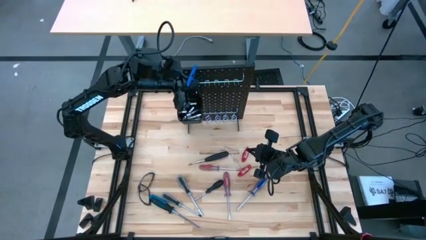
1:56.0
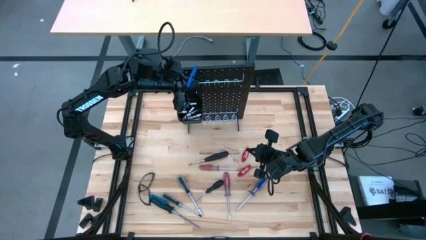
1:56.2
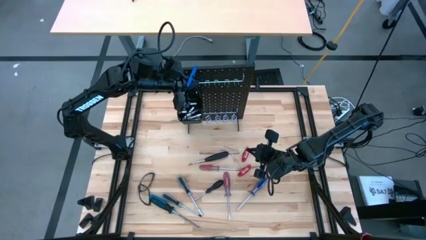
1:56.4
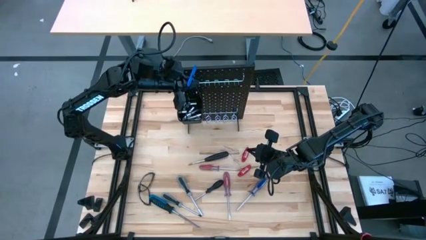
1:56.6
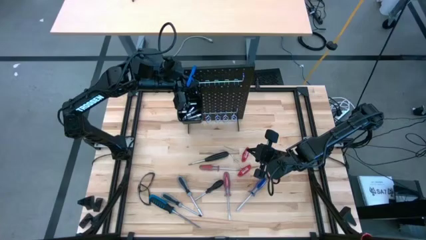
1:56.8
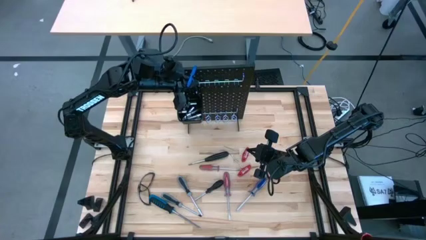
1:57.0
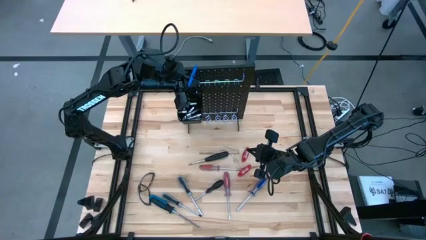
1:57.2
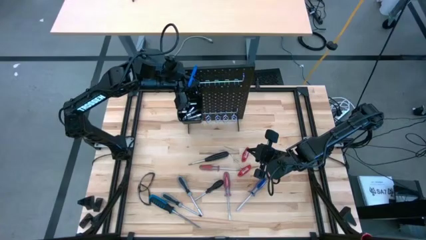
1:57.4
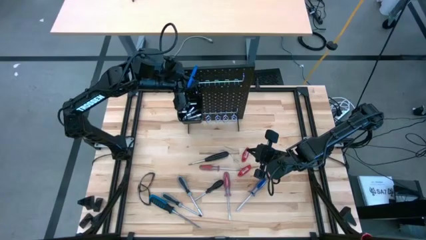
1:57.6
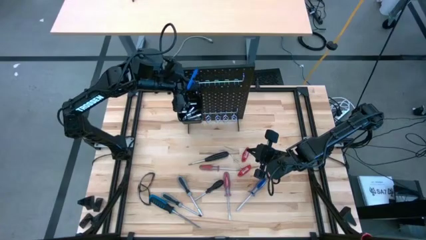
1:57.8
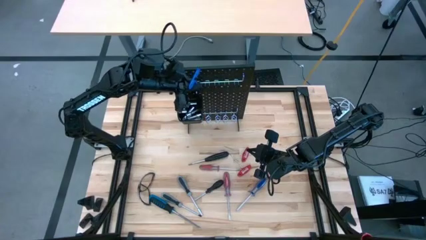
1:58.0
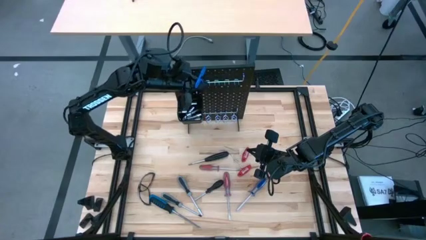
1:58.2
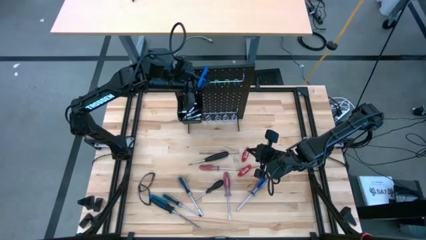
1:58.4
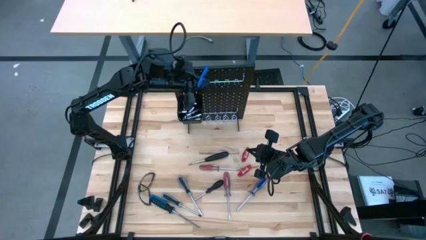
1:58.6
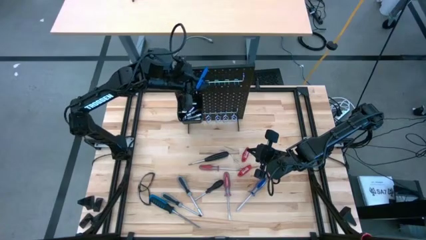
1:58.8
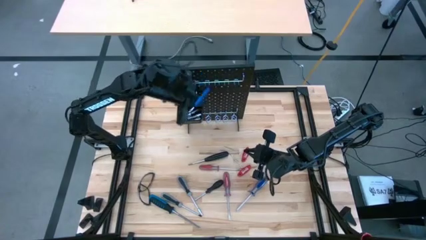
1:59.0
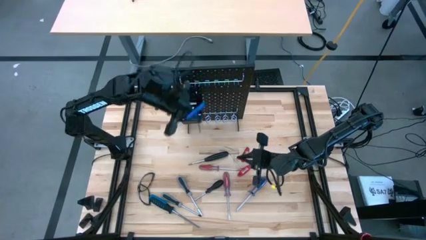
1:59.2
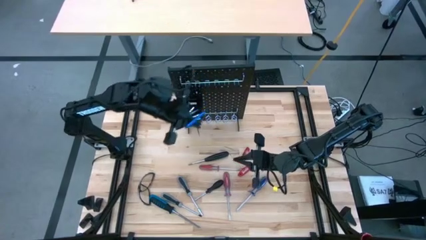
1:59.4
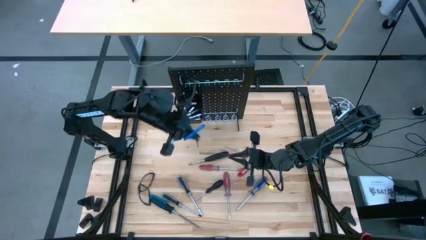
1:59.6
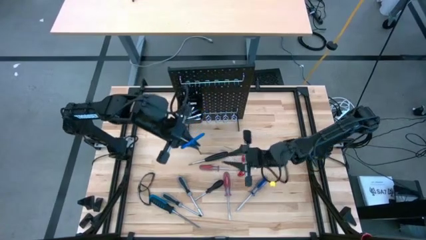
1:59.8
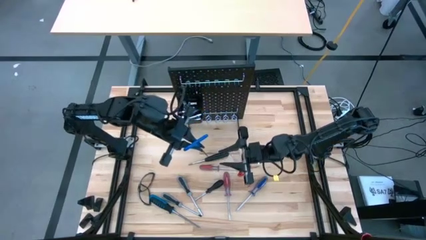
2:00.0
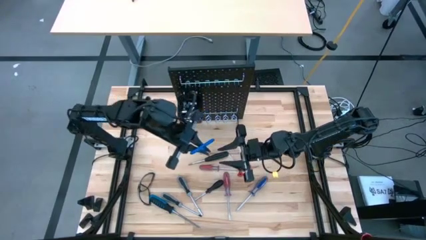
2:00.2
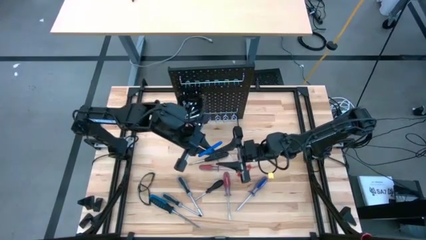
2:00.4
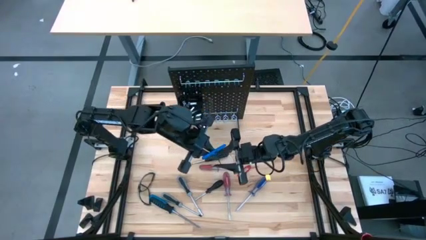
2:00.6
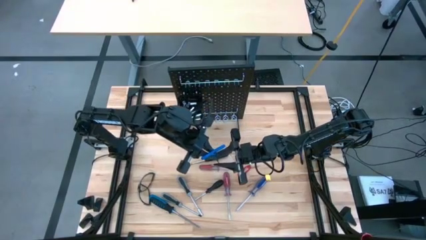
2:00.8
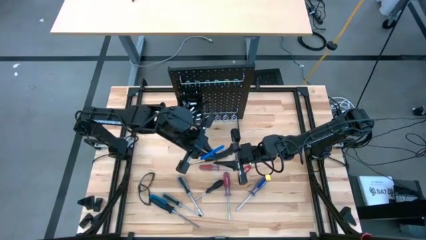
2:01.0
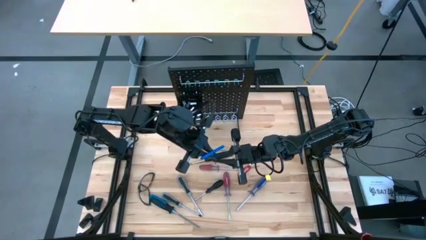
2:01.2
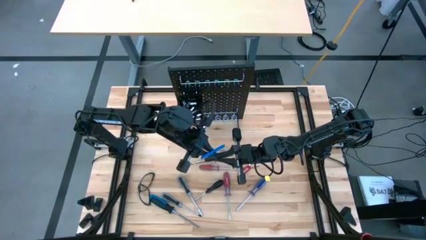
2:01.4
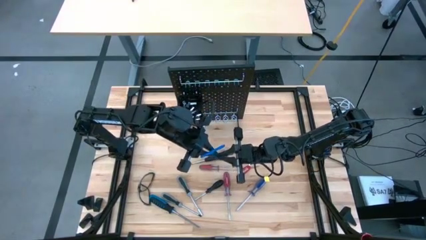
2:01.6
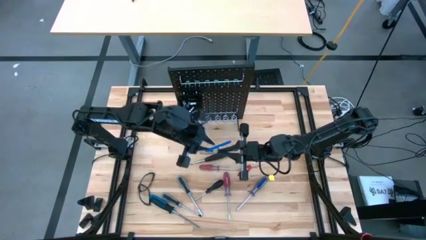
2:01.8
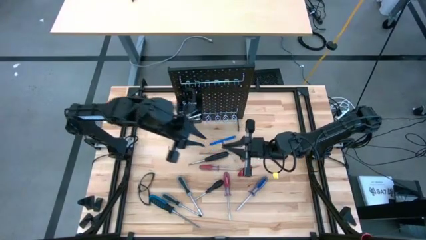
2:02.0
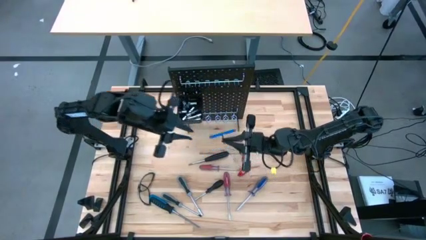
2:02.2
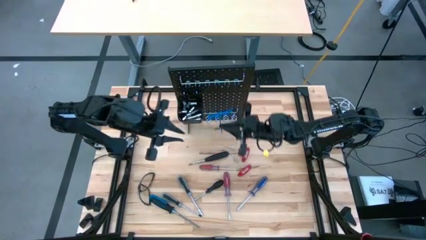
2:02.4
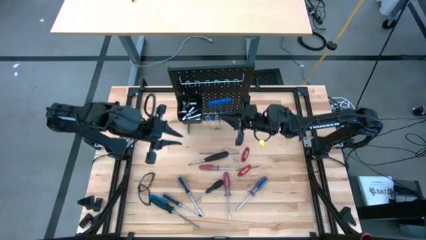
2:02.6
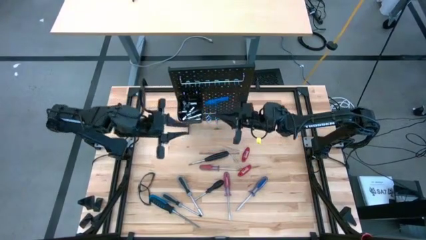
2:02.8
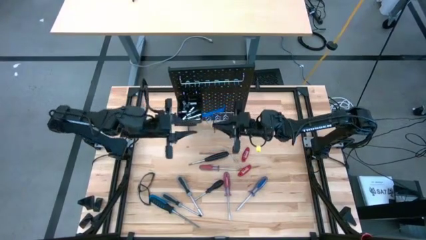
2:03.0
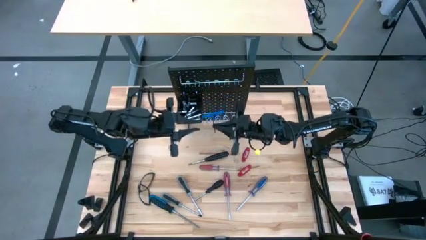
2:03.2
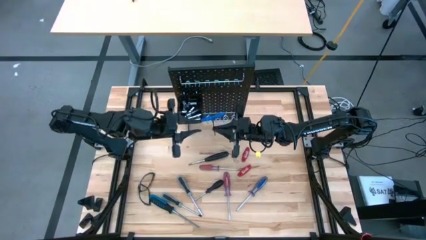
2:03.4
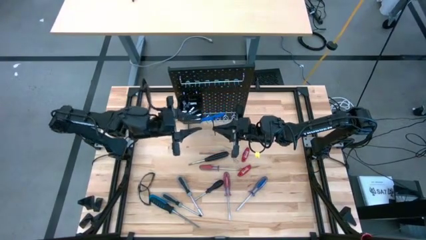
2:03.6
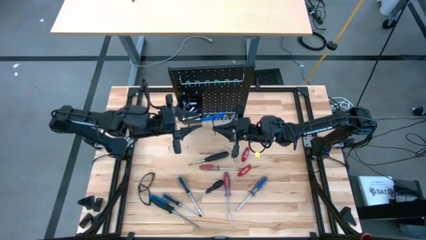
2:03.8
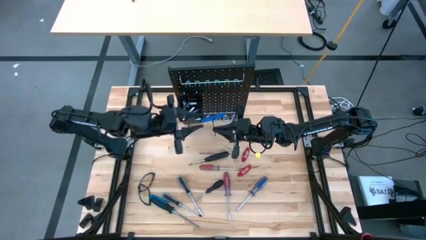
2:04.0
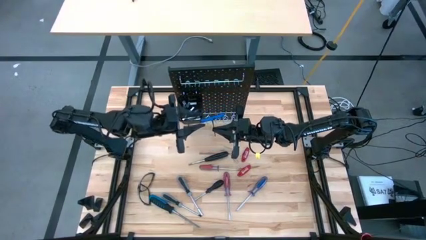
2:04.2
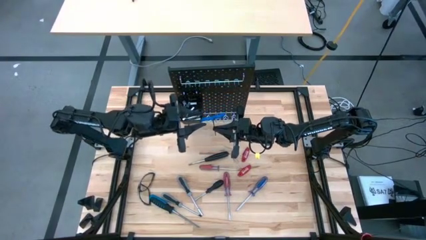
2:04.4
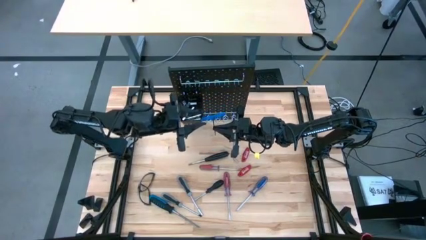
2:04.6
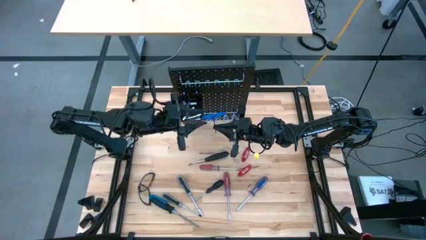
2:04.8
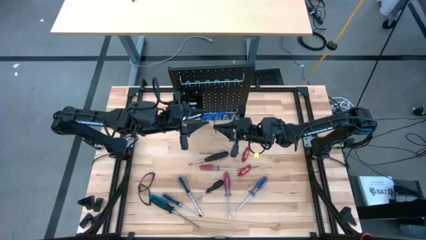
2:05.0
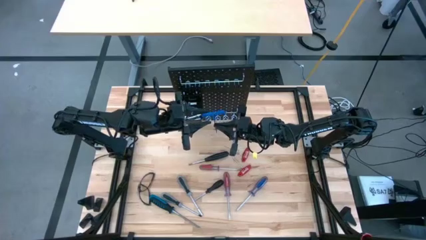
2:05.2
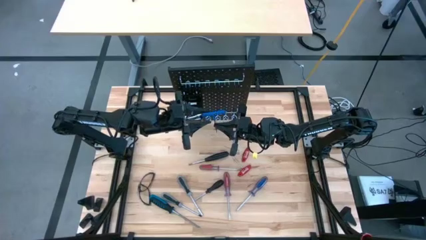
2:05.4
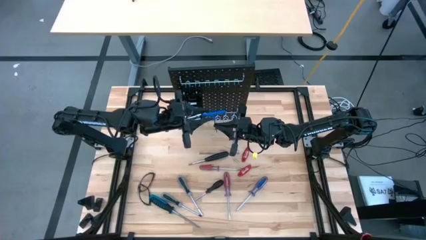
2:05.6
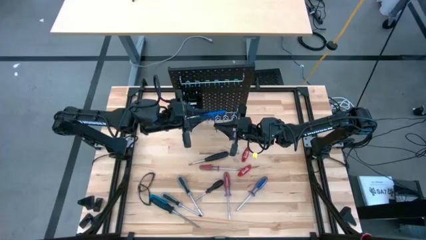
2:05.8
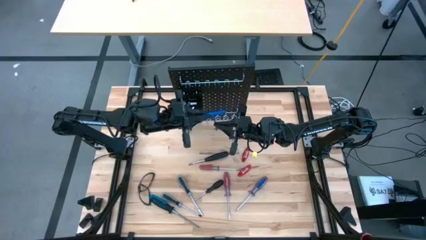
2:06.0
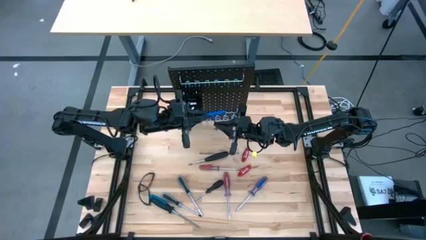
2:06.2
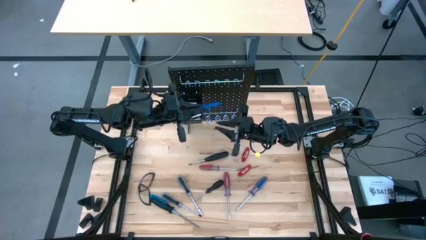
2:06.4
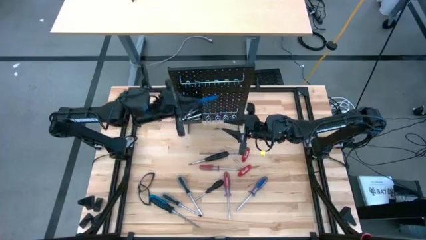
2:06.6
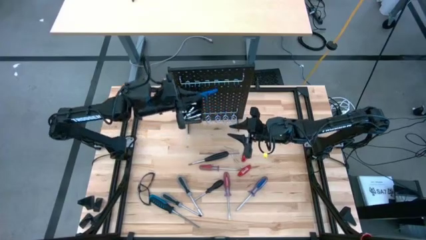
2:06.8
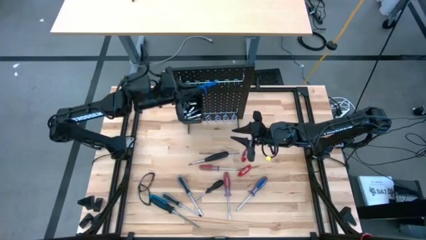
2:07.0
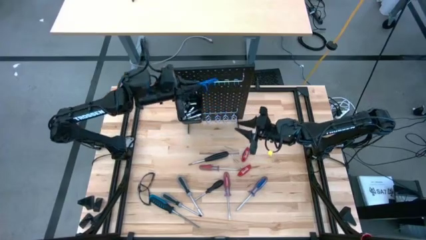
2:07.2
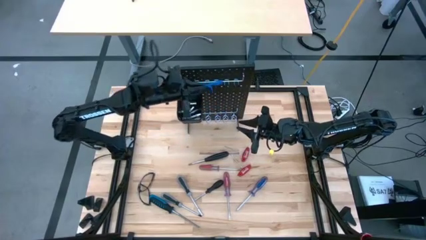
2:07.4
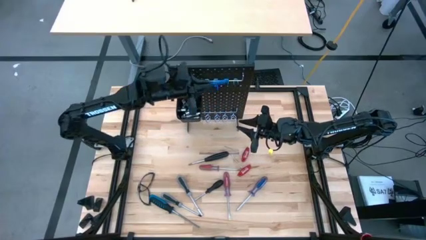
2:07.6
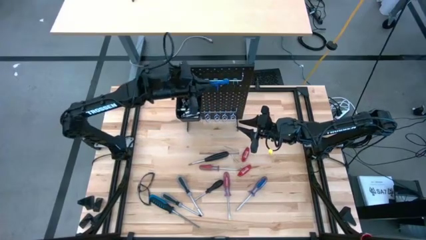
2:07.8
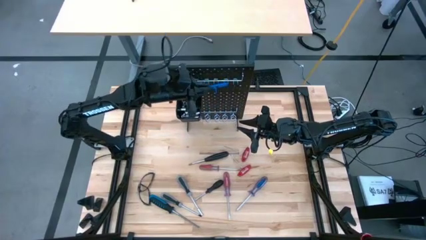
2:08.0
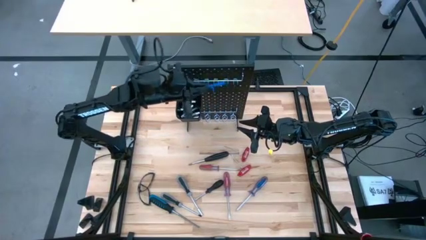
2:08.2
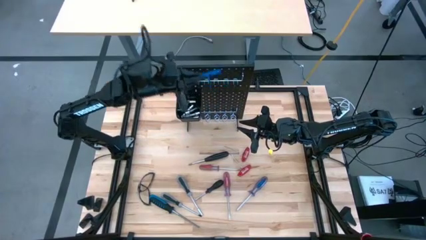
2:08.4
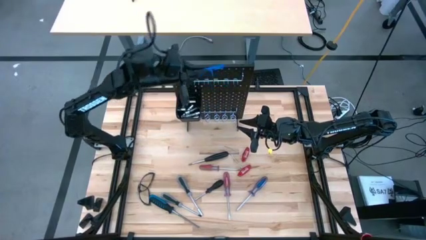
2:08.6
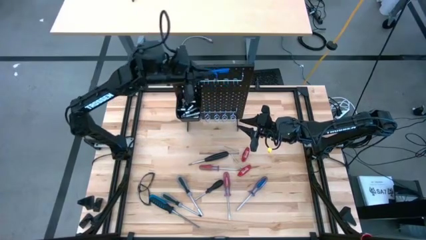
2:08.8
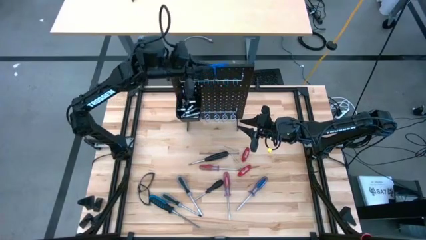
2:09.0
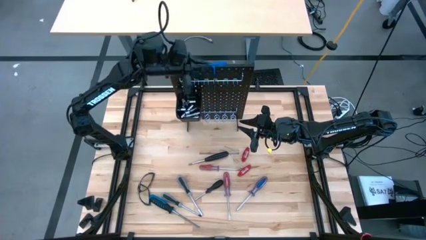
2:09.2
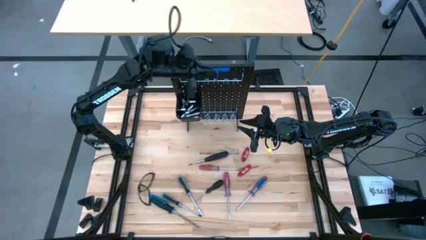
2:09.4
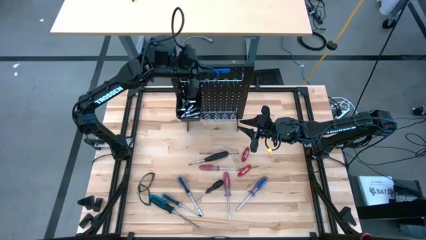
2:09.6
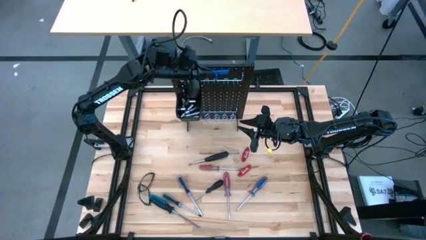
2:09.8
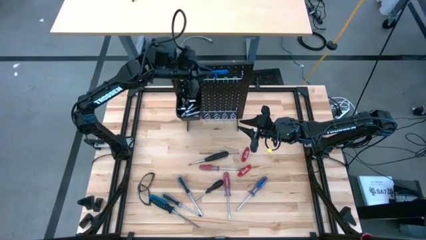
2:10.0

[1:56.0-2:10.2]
Task: Hang tools onto peg board
Hang the pick tool on the pegboard
